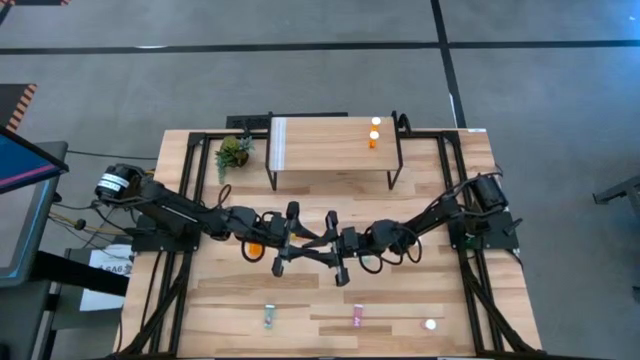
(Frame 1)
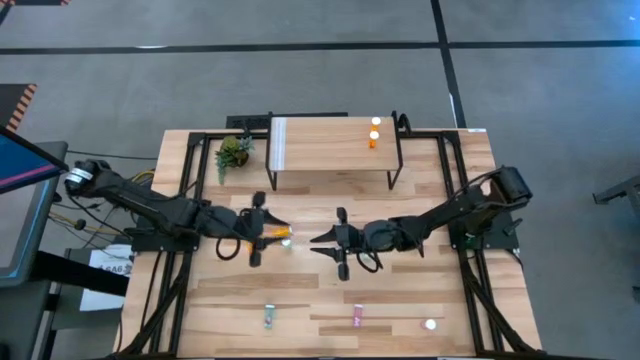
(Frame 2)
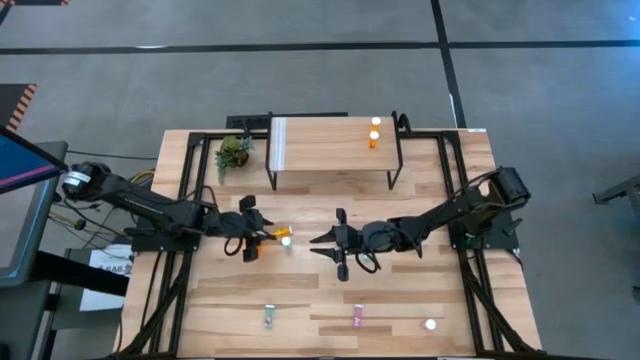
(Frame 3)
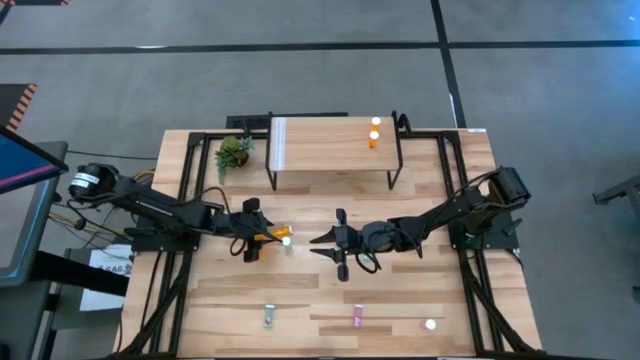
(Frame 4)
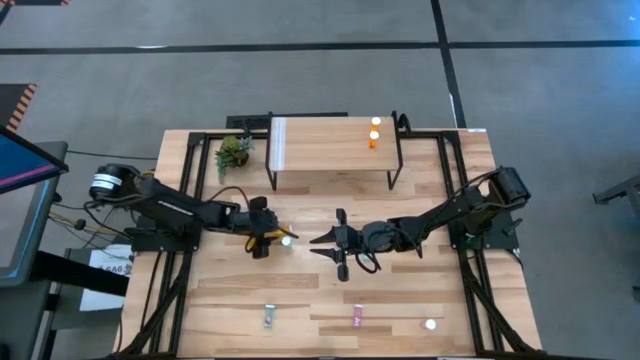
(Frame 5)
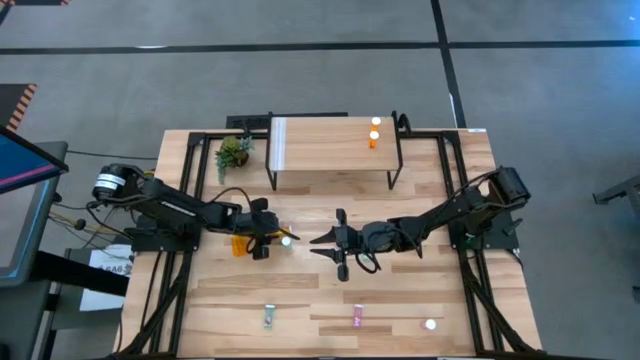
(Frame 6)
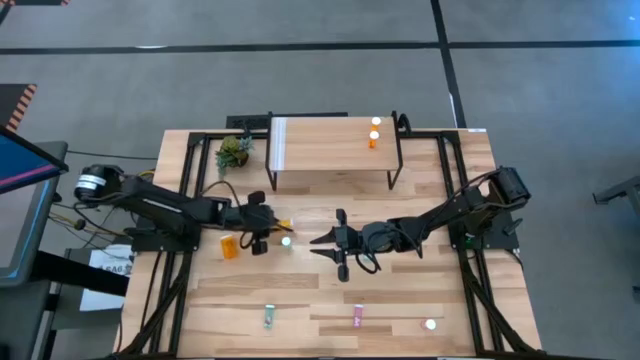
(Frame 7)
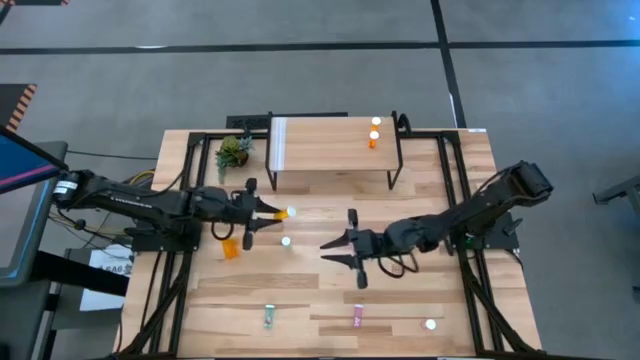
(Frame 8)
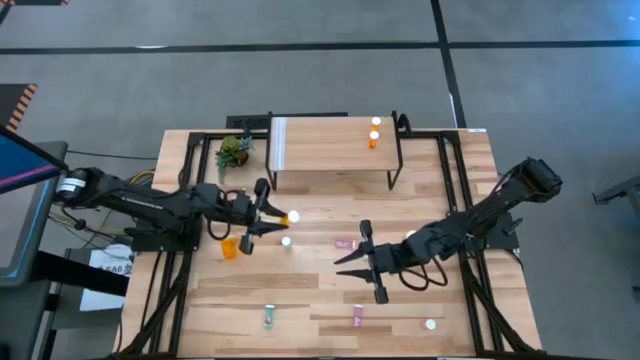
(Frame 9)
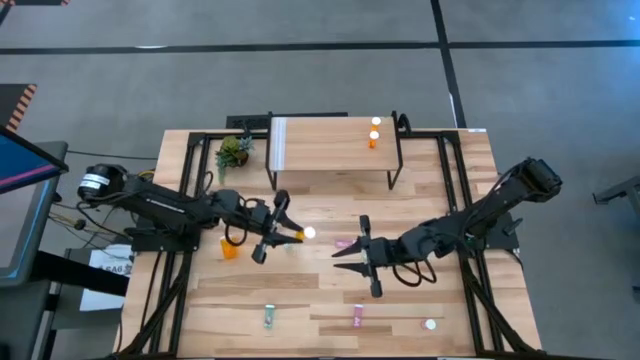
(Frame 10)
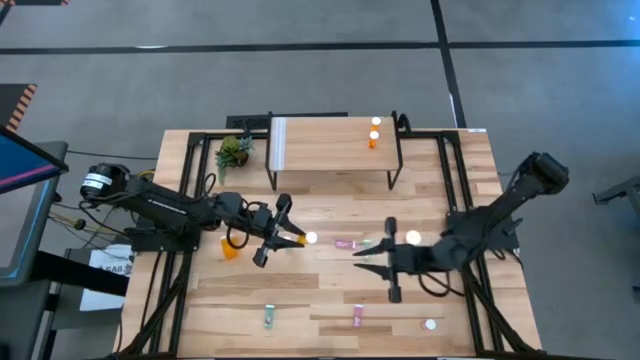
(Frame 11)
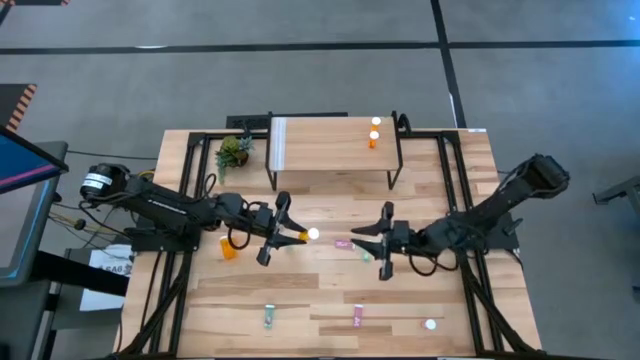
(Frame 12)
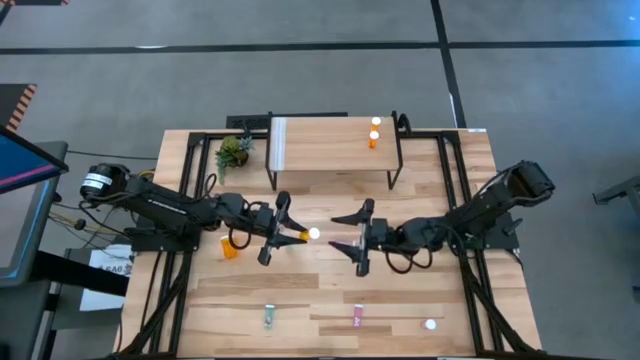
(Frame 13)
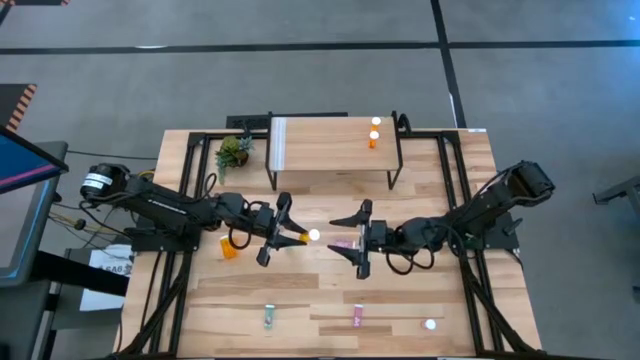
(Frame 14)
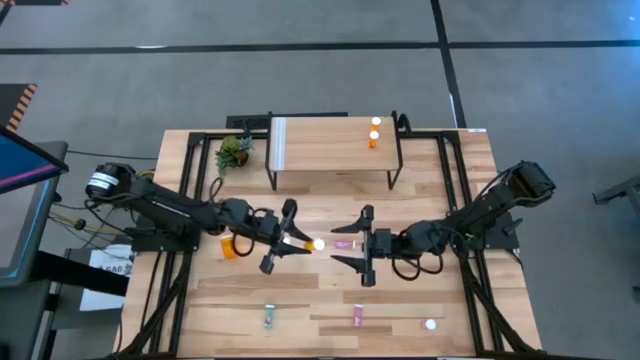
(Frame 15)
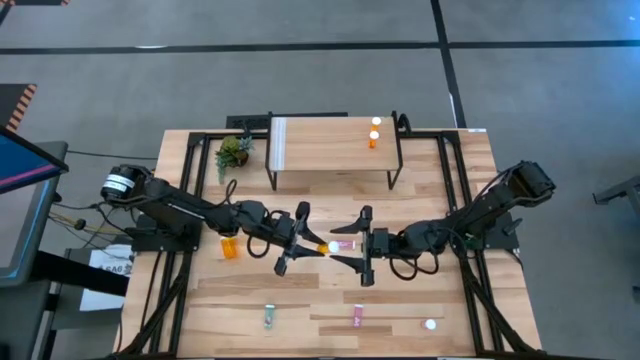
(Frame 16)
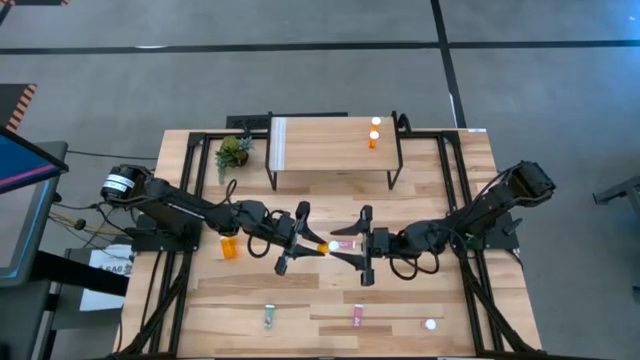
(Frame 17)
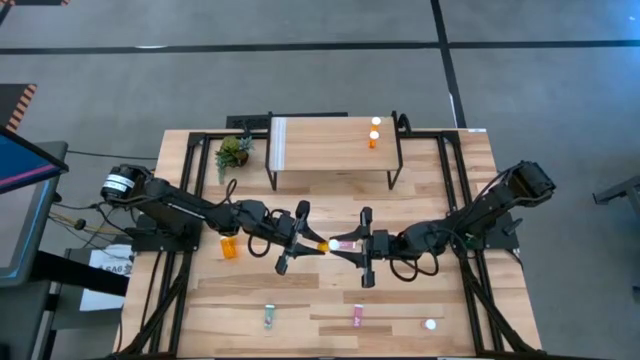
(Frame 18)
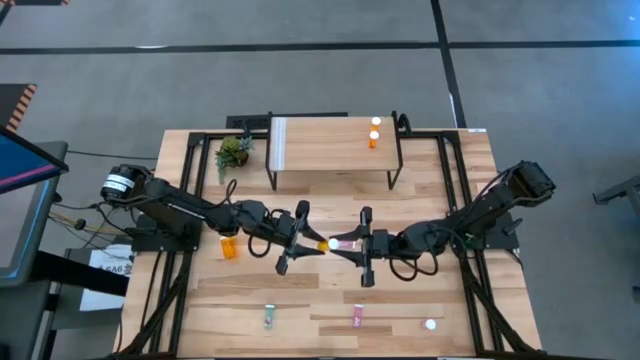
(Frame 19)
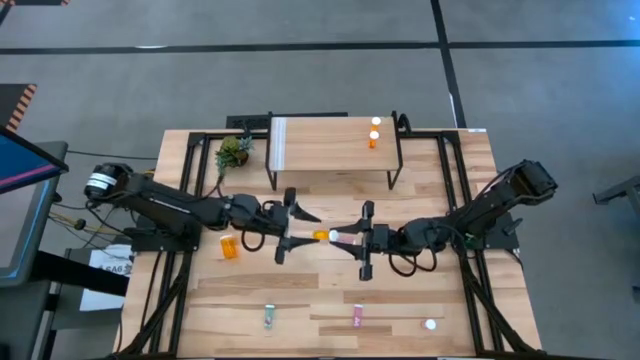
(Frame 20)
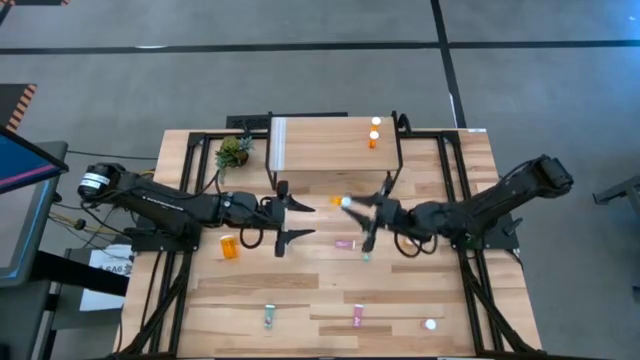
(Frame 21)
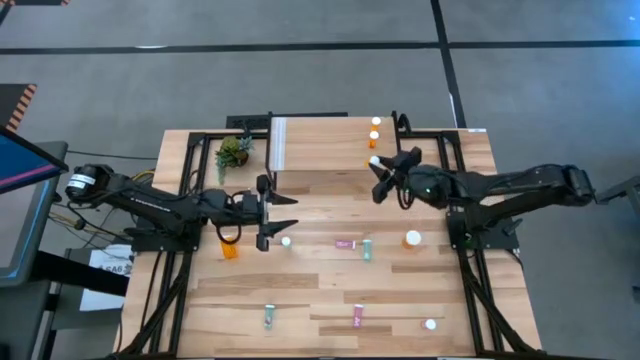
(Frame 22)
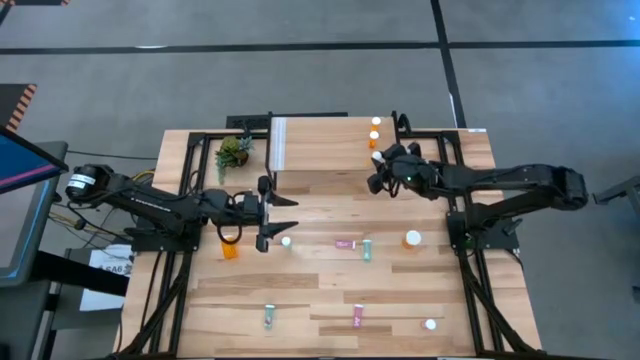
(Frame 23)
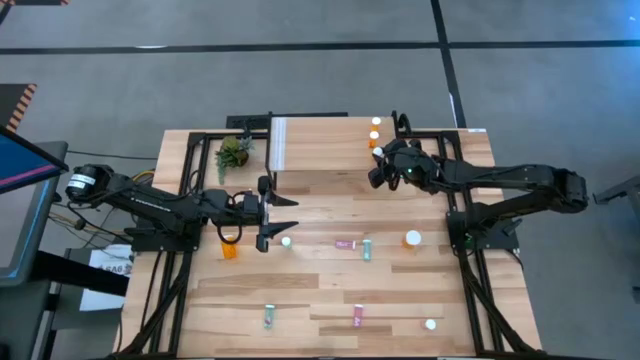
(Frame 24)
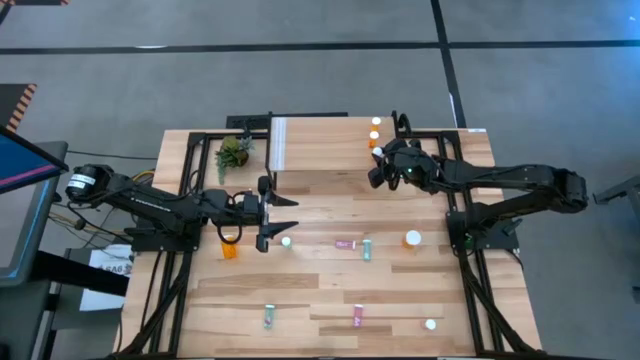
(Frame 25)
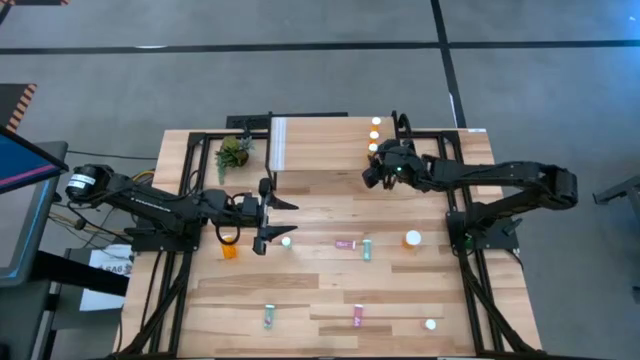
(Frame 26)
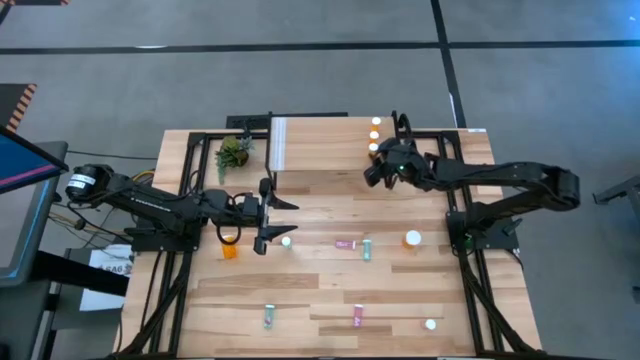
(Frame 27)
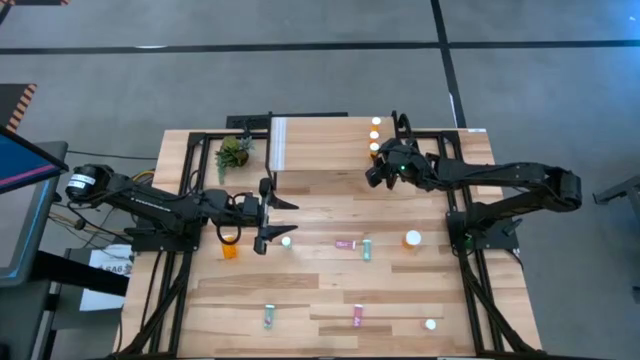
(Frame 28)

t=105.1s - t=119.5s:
Task: Pick and place medicine bottles onto shelf by color
Put the small orange pill bottle on the shelf aligned with the other small orange pill bottles

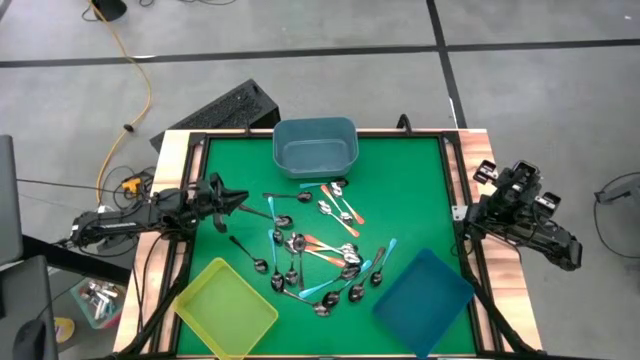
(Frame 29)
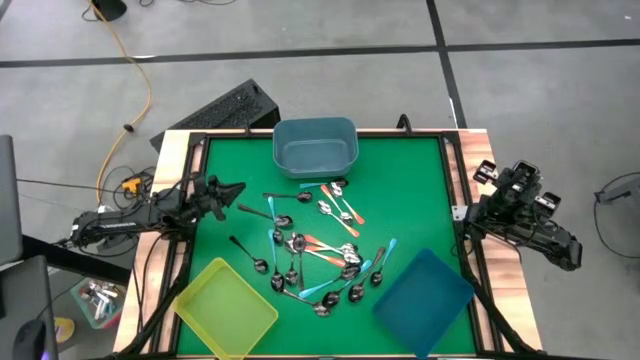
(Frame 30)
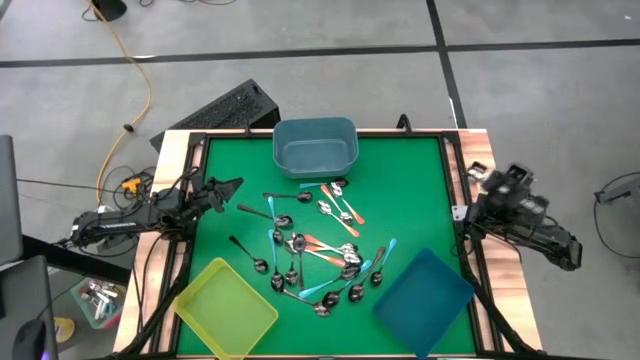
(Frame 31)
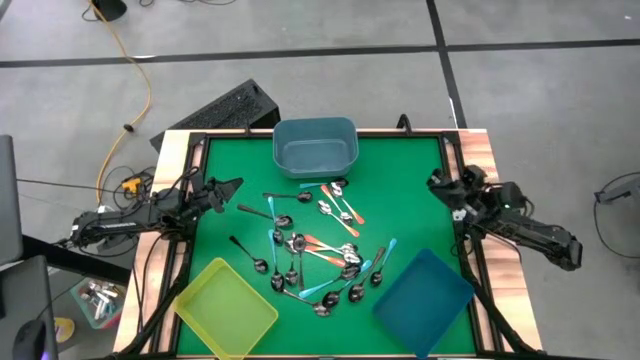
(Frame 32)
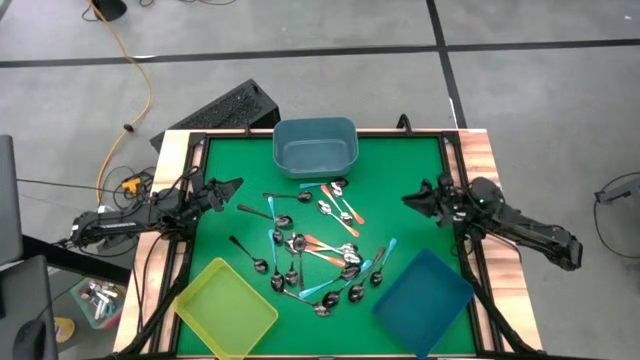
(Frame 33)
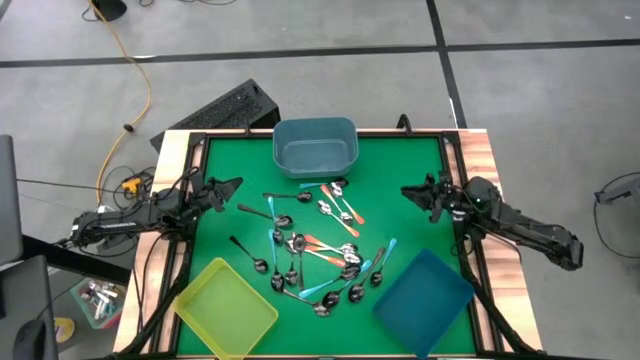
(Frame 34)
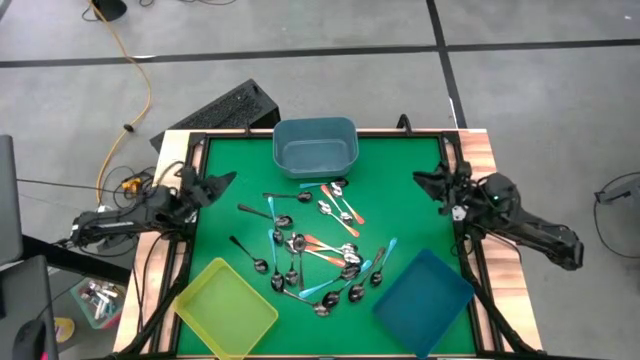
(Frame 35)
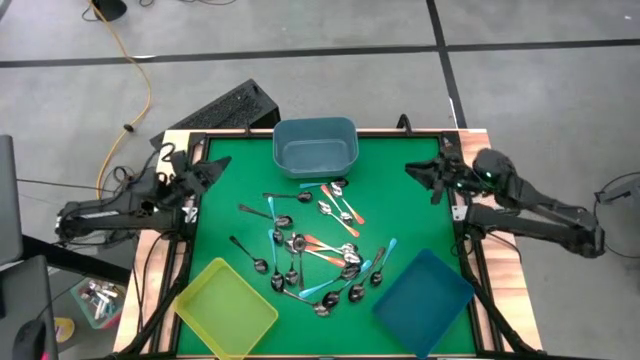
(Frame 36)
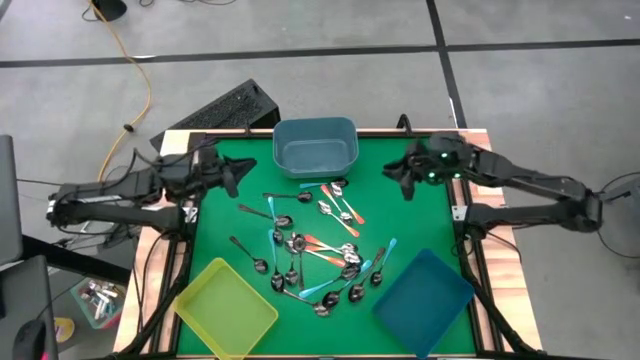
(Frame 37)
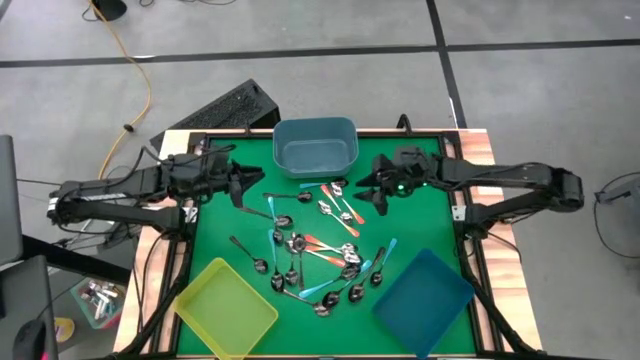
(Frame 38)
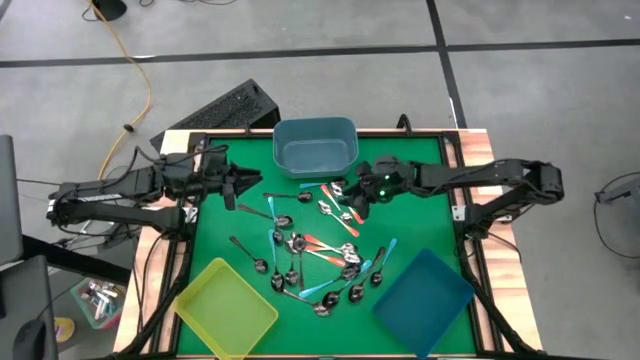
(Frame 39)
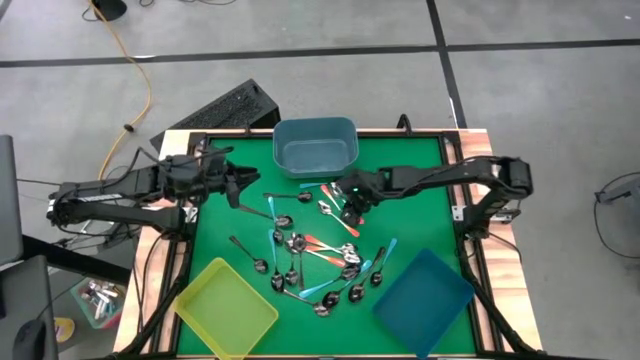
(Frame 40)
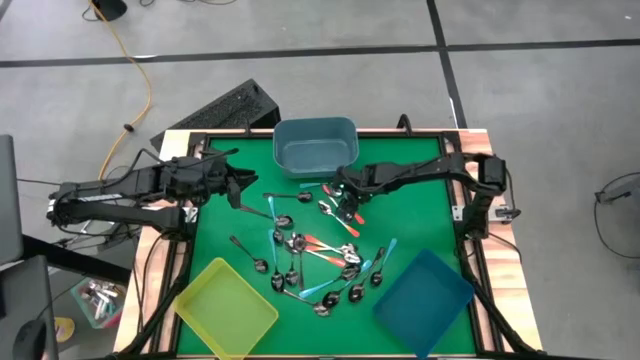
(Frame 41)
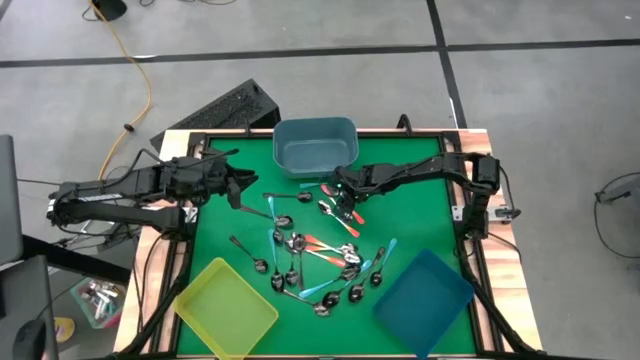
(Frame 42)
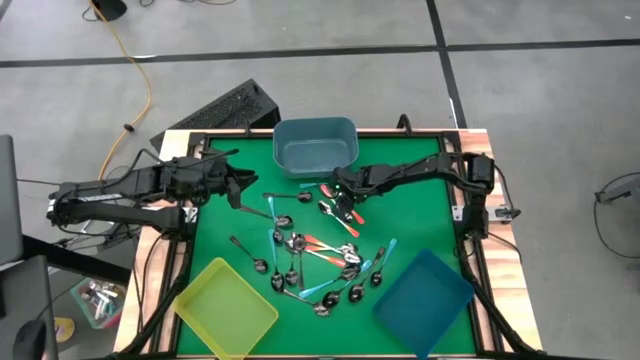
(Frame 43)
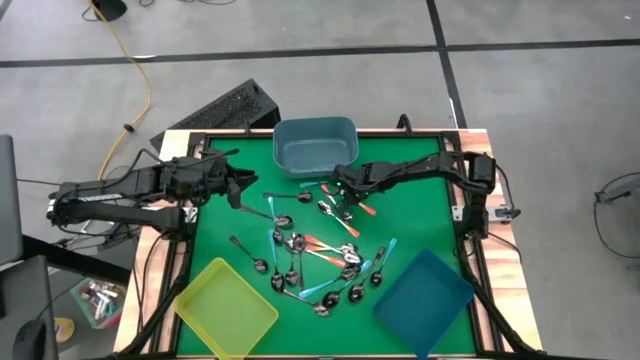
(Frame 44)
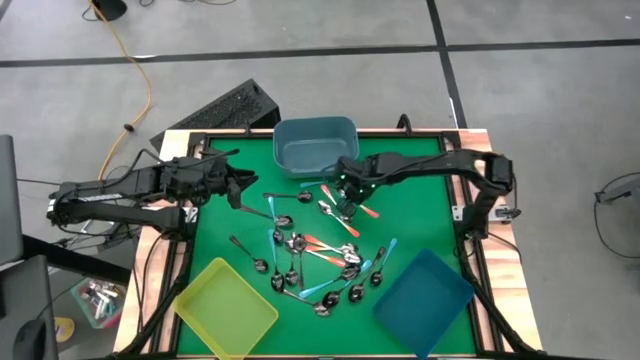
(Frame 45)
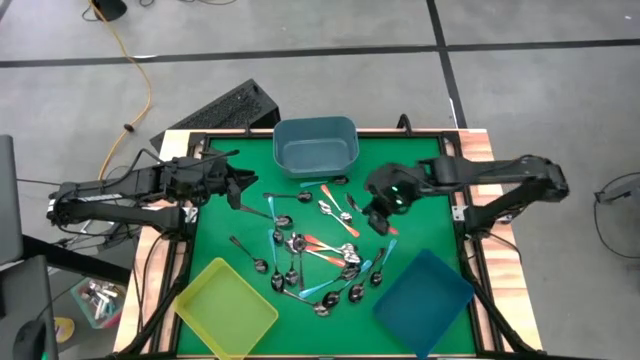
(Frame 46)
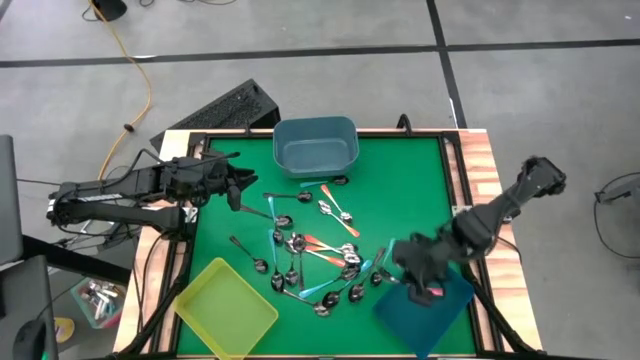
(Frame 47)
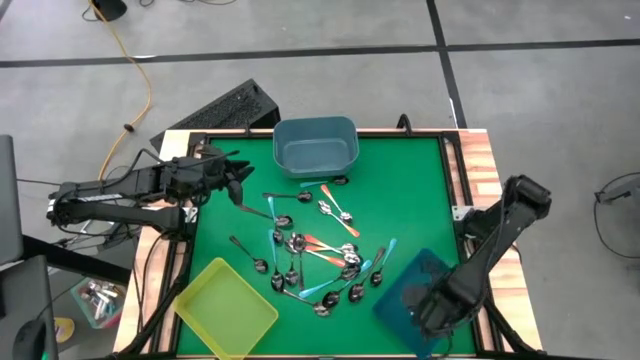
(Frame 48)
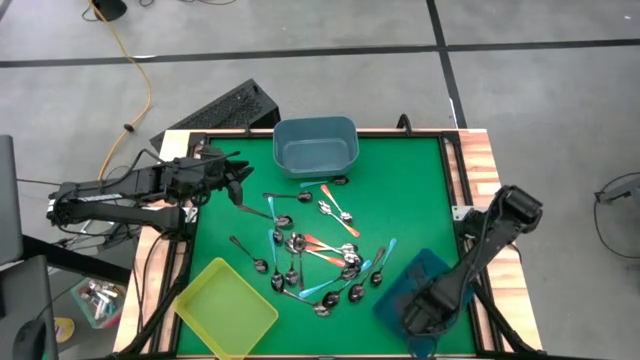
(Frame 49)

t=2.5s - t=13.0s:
Task: Sort silverware by color (type)
Put the orange spoon into the blue bin
